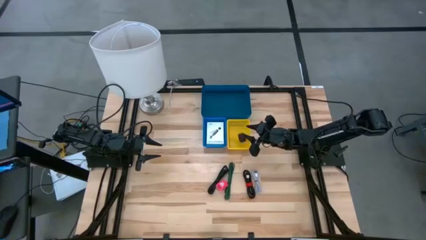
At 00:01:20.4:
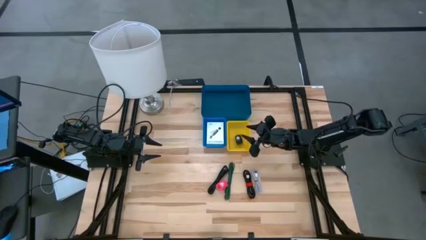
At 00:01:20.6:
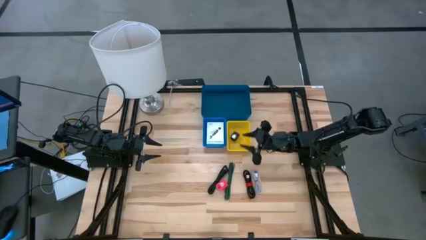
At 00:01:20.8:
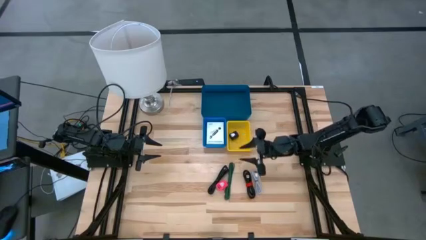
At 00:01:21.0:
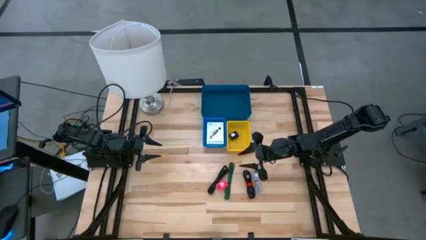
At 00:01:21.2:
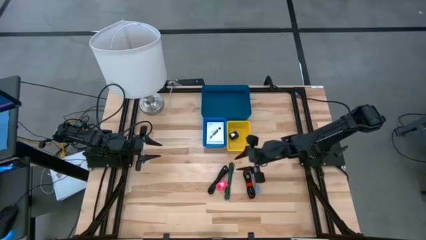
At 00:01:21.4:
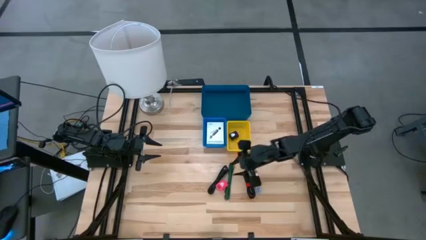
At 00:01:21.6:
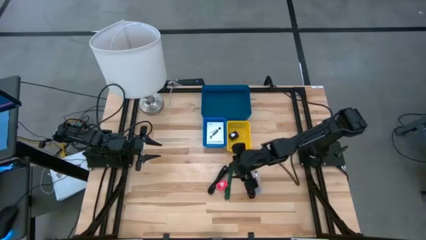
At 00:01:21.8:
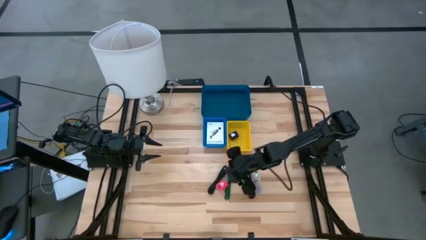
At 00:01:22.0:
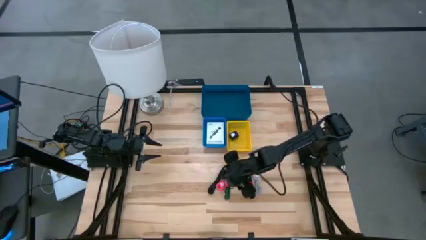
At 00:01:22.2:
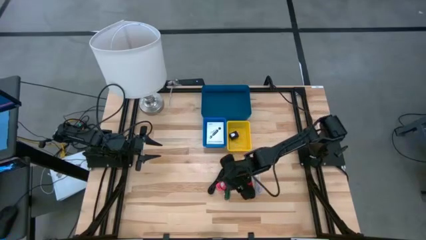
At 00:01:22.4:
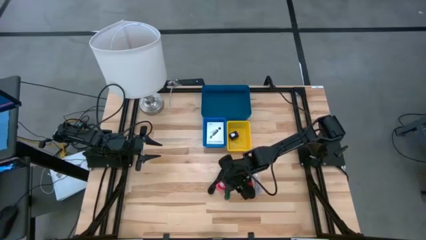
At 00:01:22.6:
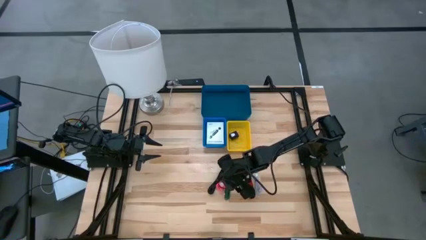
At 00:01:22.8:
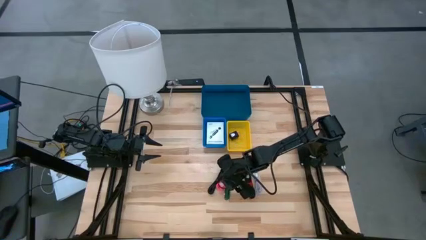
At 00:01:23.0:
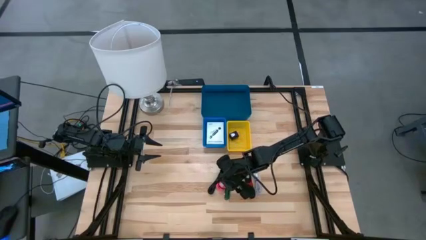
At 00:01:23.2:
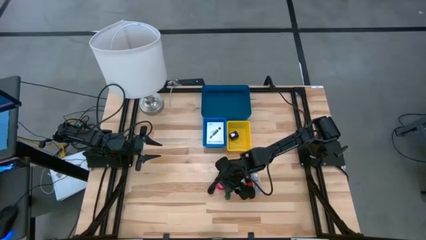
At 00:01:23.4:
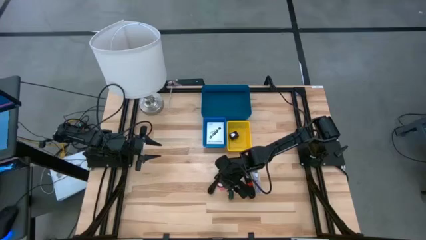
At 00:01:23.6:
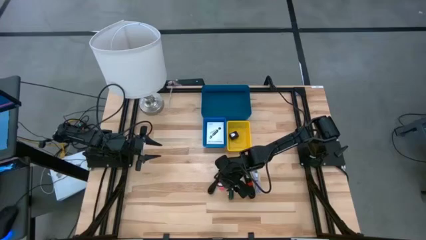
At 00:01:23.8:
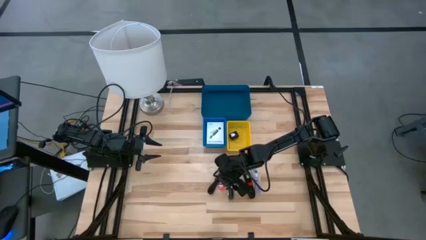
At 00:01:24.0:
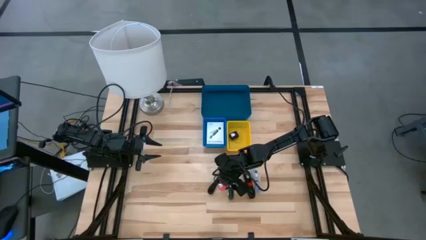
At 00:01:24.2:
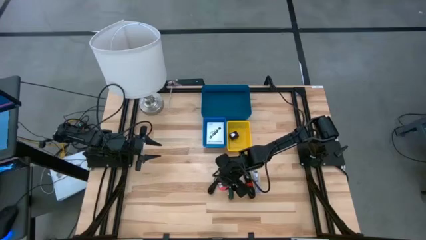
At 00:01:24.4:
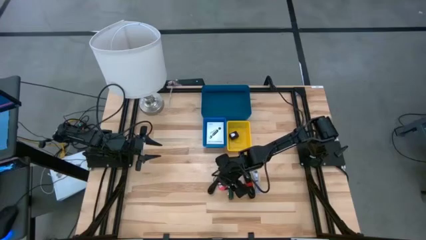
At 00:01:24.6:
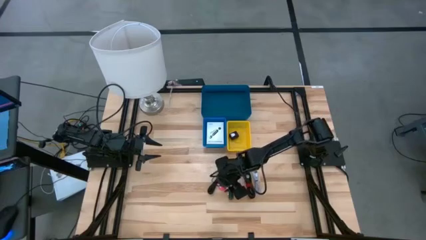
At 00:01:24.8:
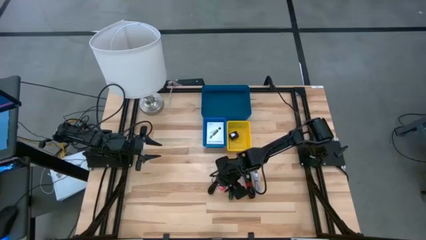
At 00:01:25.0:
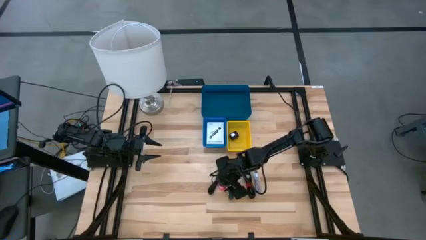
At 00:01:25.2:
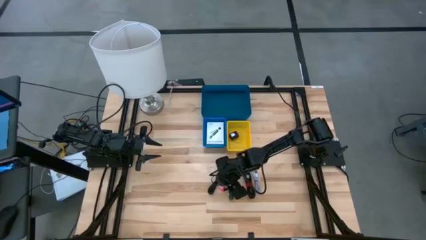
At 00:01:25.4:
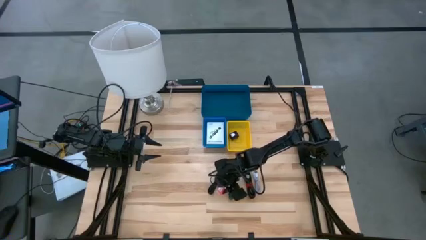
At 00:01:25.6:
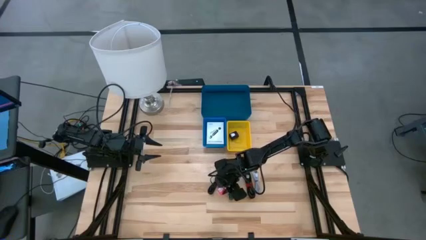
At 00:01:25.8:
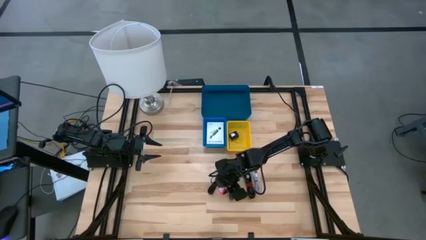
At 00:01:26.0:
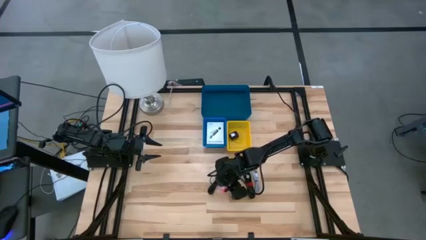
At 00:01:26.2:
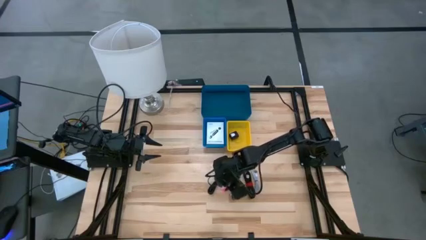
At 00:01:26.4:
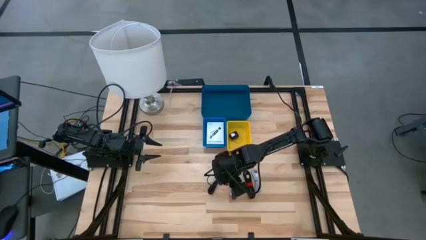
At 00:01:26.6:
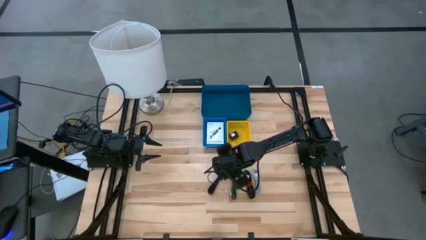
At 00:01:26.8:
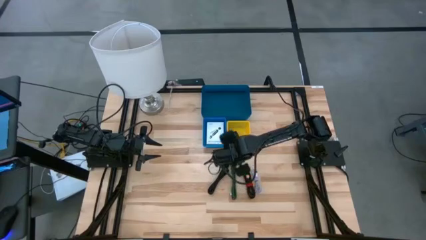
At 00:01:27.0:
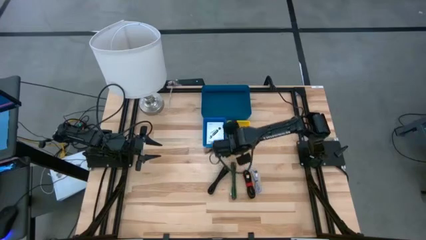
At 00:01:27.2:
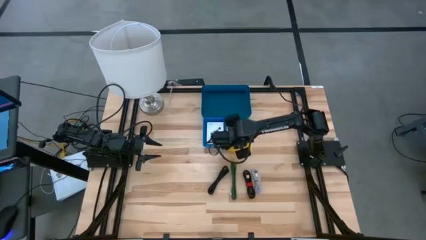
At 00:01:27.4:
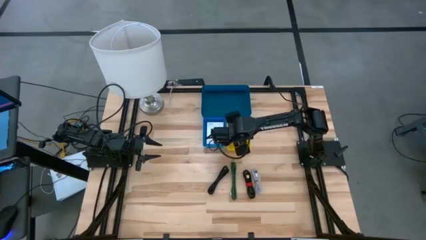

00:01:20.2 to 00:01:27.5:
Task: Pick and place items into bin
Put the pink charger adapter into the yellow bin

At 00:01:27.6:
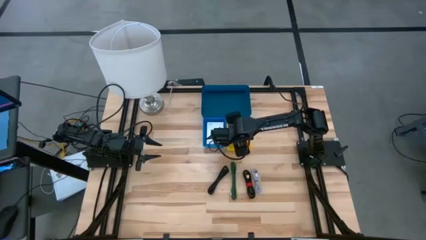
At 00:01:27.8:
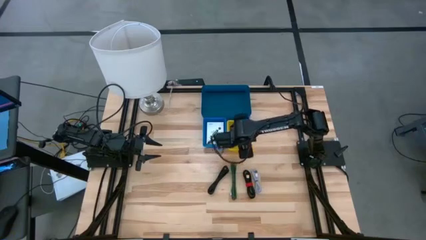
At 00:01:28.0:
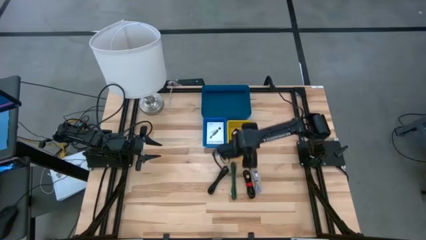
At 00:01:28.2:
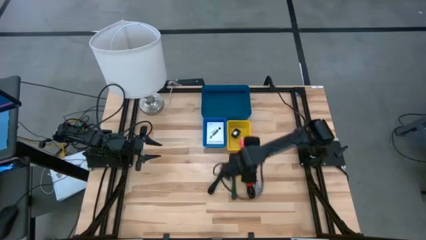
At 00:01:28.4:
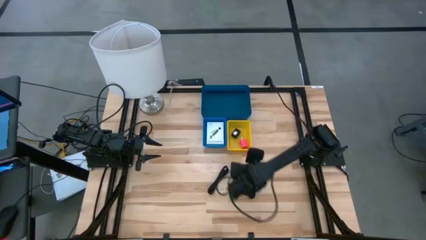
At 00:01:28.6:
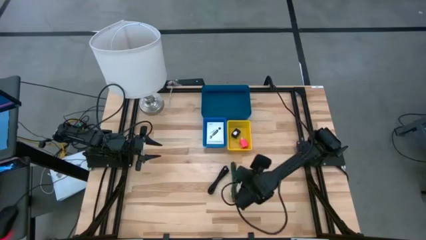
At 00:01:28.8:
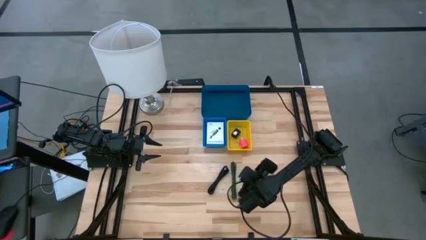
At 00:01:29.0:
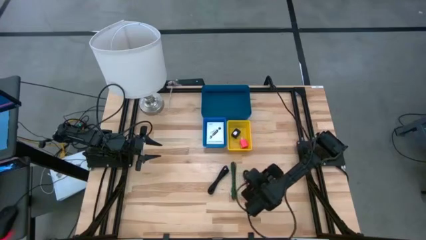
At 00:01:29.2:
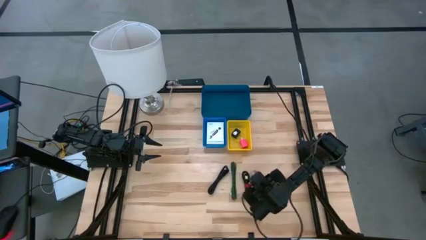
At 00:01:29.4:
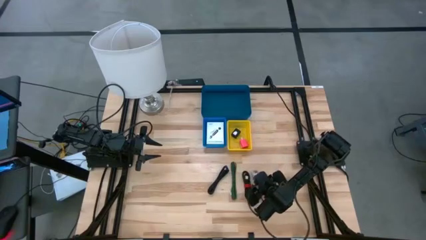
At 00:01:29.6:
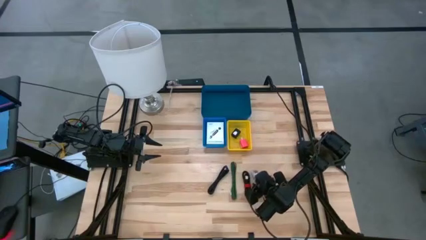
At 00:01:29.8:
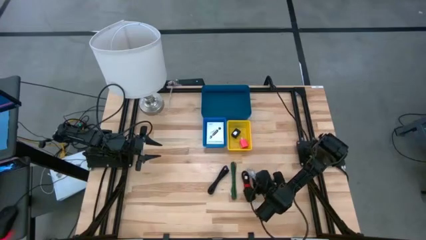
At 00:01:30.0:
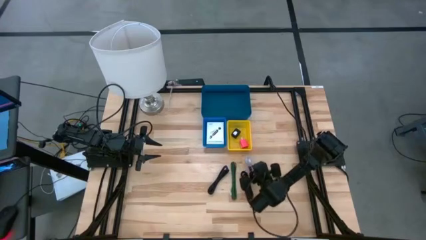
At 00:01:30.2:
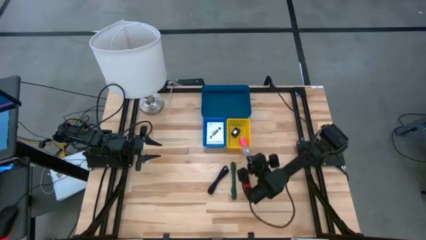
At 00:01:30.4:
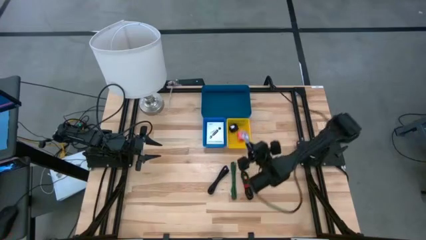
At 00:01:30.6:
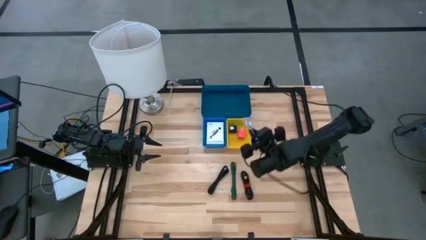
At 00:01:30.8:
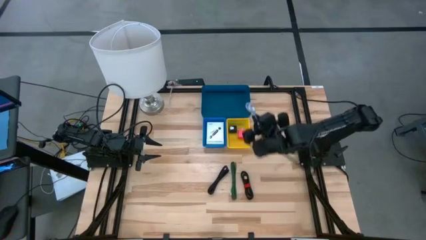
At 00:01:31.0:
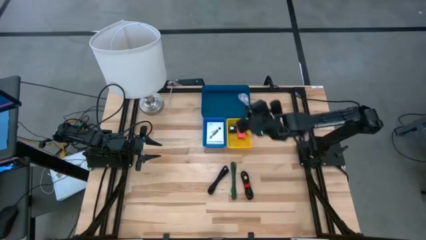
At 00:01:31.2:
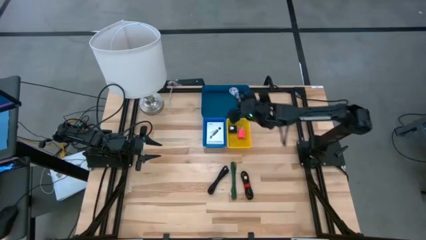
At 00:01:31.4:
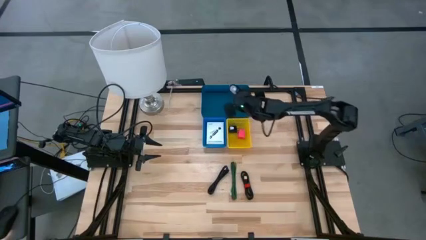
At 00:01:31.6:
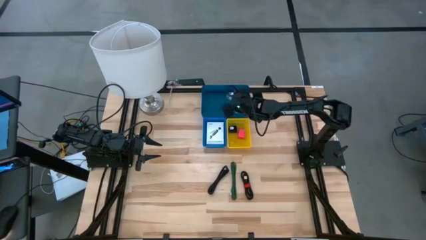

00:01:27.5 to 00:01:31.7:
Put the white charger cable into the dark blue bin

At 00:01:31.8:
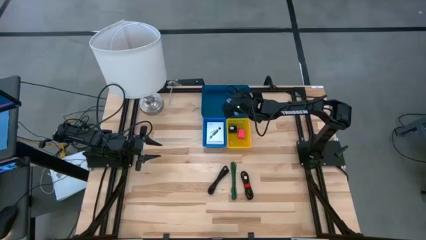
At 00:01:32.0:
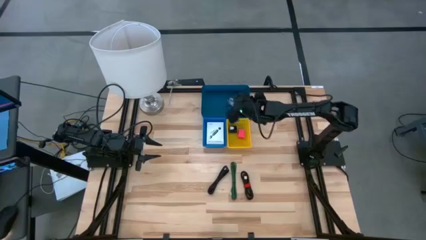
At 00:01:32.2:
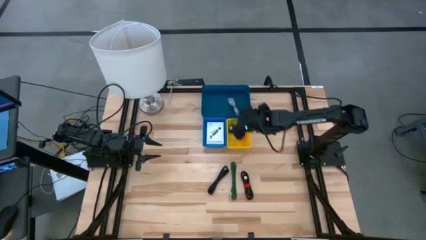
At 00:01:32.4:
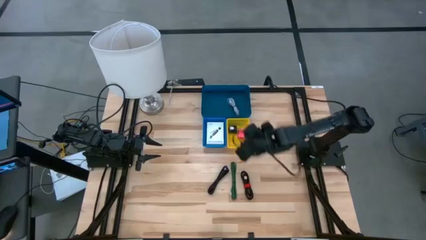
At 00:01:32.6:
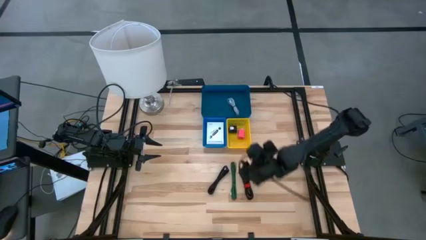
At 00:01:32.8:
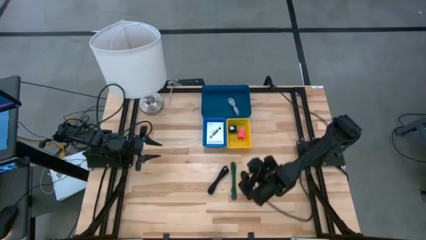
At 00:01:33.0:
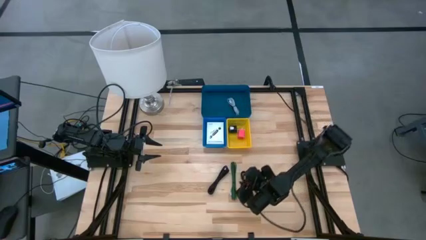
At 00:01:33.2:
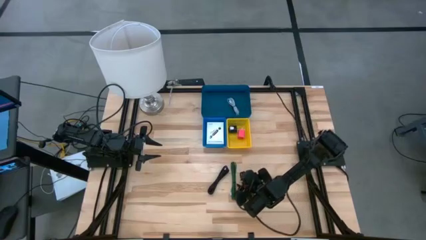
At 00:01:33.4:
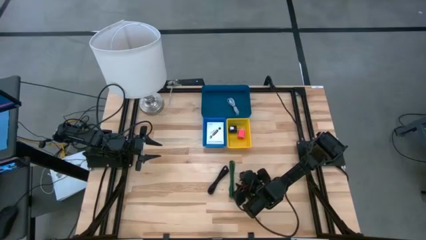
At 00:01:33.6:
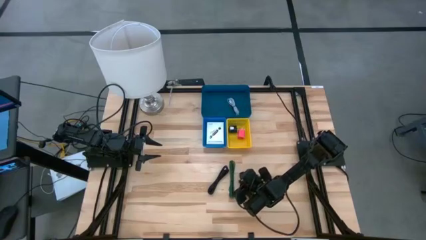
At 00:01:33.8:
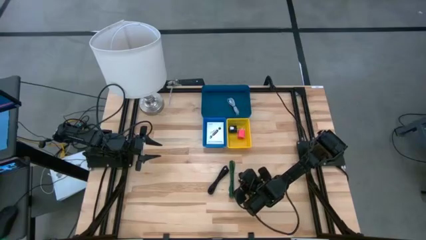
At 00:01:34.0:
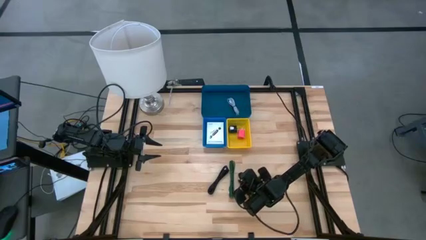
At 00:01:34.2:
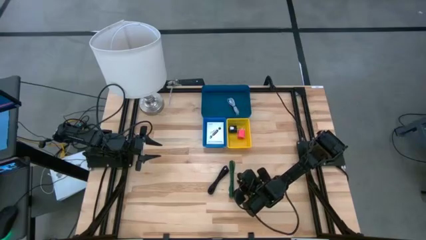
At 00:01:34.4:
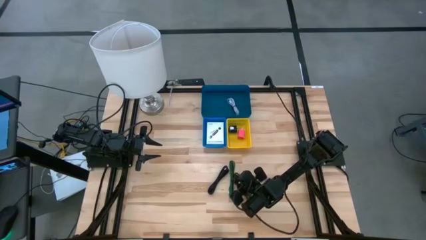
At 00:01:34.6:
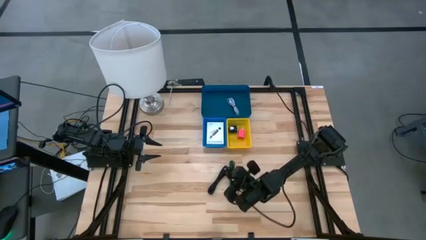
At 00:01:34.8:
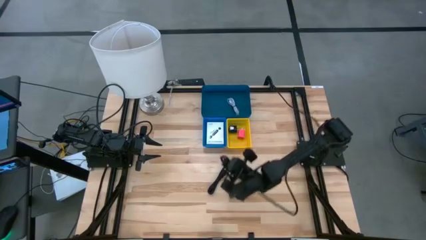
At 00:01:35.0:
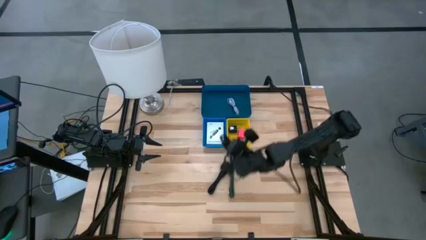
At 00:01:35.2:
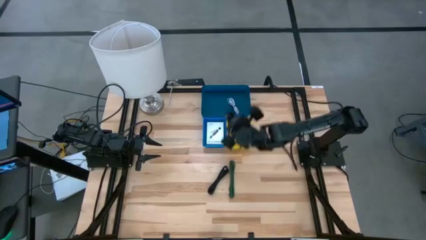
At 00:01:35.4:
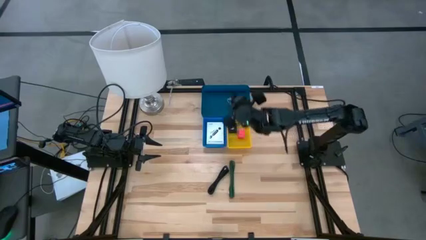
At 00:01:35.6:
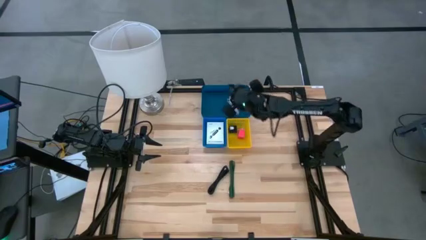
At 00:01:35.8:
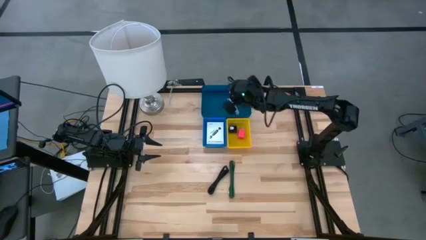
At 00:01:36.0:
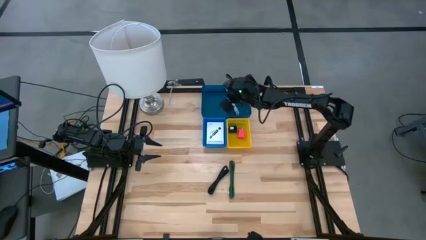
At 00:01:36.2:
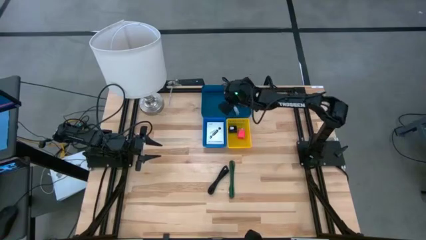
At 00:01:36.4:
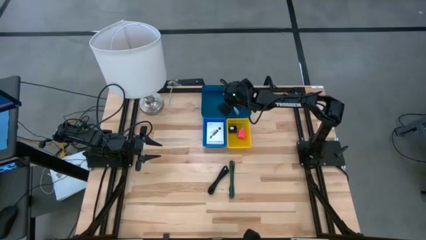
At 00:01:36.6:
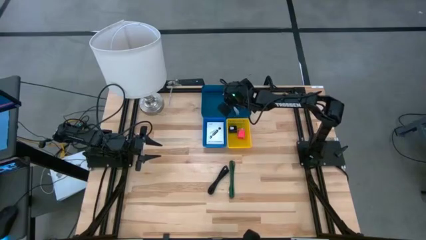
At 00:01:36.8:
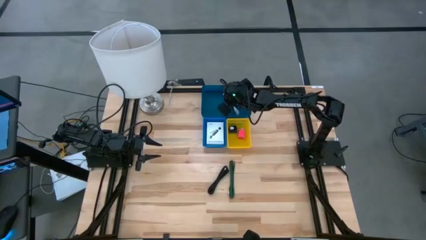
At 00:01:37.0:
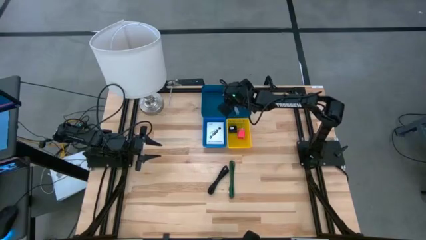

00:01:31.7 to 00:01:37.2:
Put the right black charger cable into the dark blue bin
